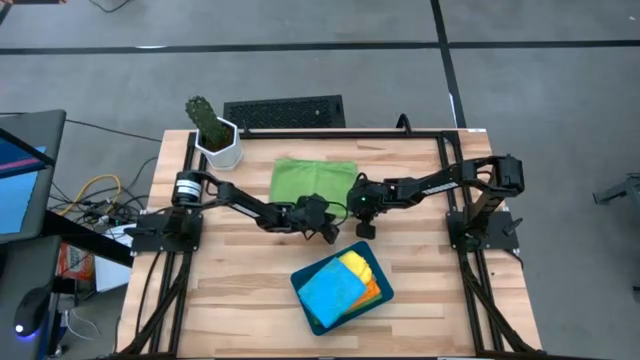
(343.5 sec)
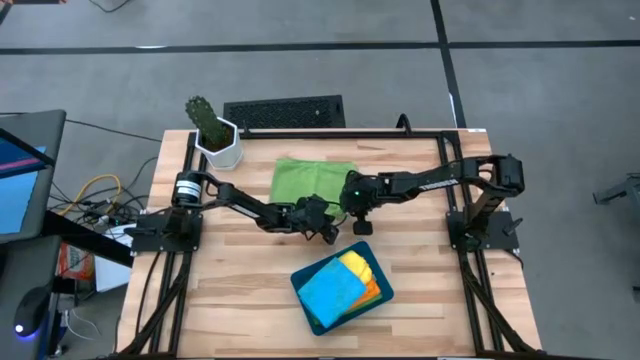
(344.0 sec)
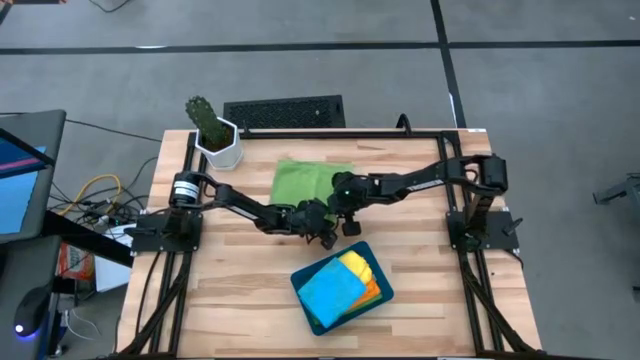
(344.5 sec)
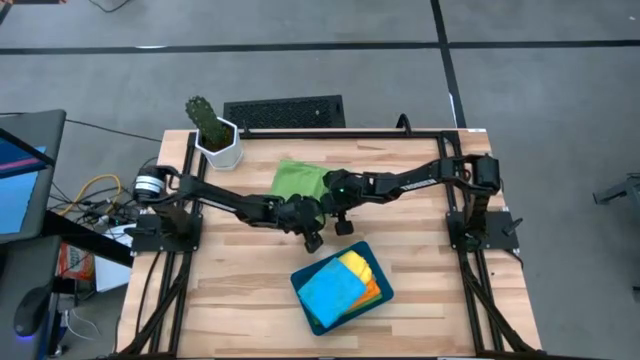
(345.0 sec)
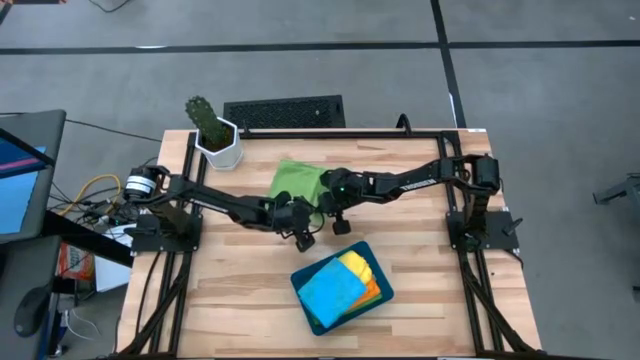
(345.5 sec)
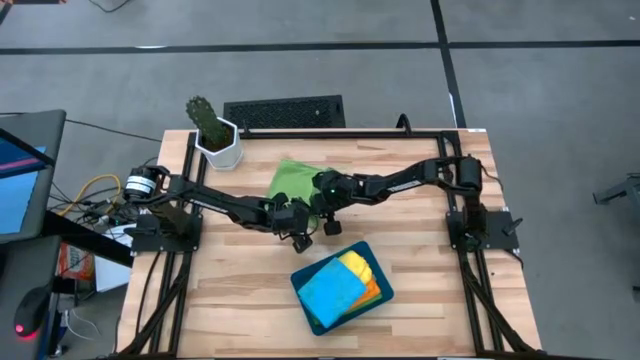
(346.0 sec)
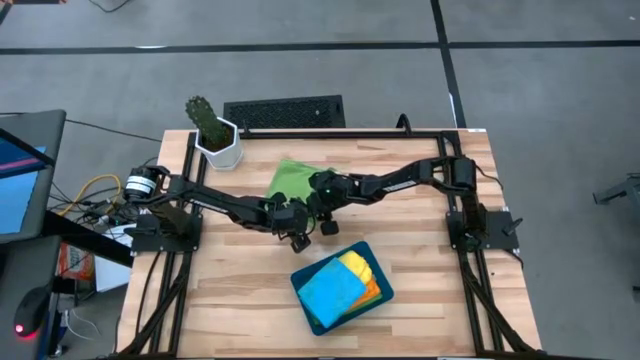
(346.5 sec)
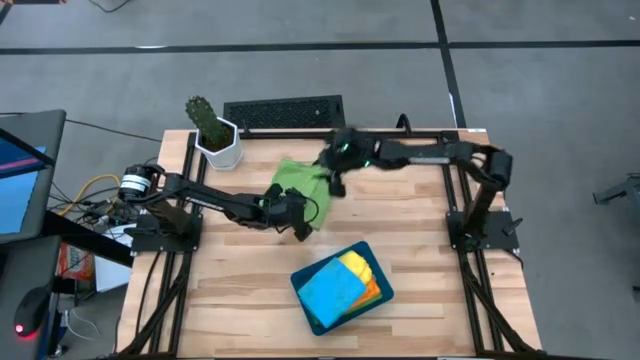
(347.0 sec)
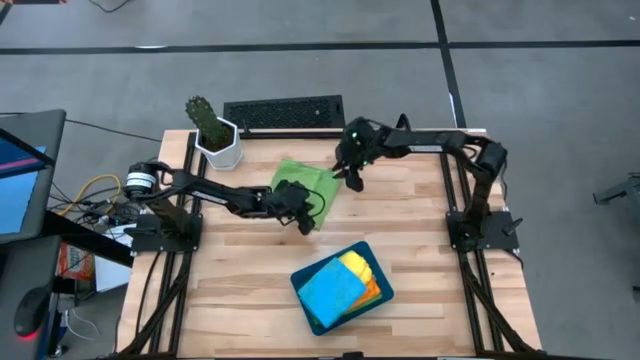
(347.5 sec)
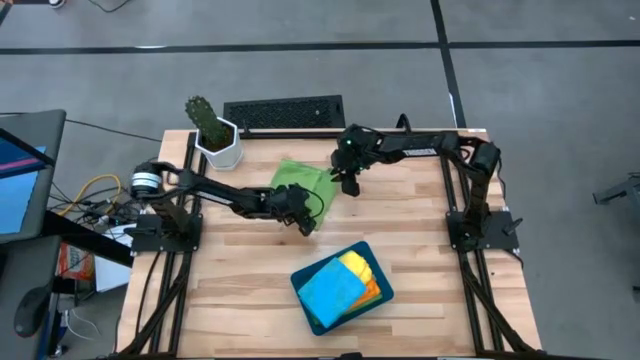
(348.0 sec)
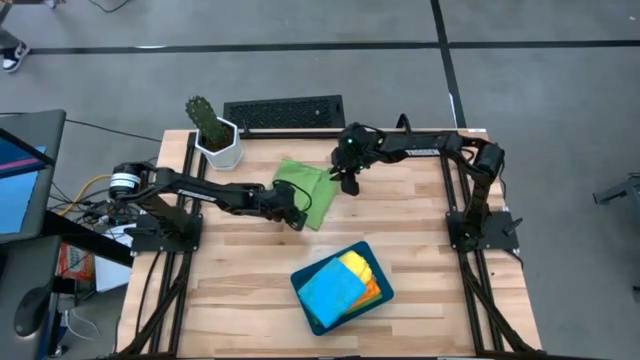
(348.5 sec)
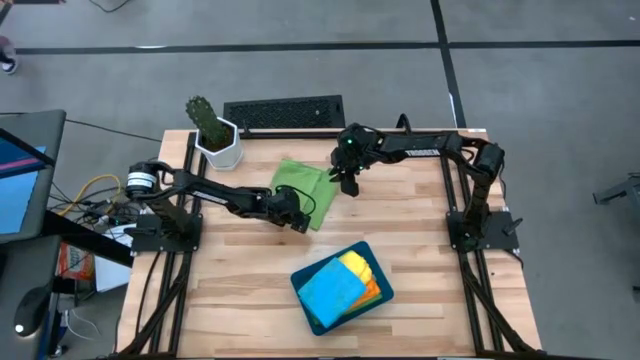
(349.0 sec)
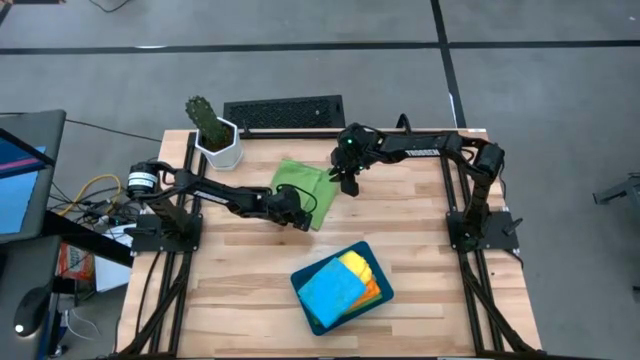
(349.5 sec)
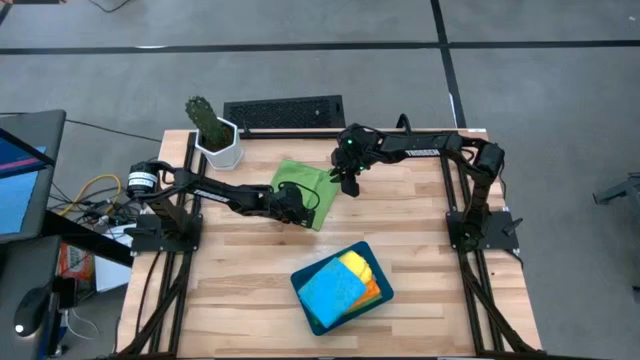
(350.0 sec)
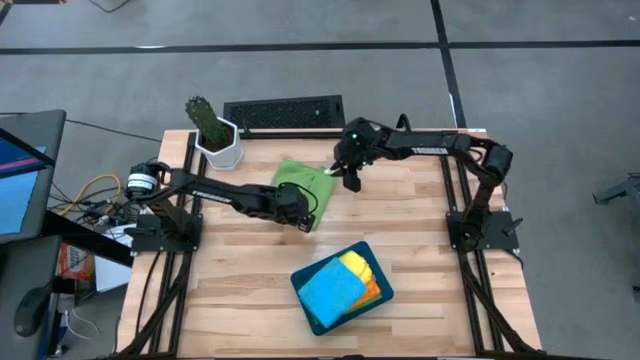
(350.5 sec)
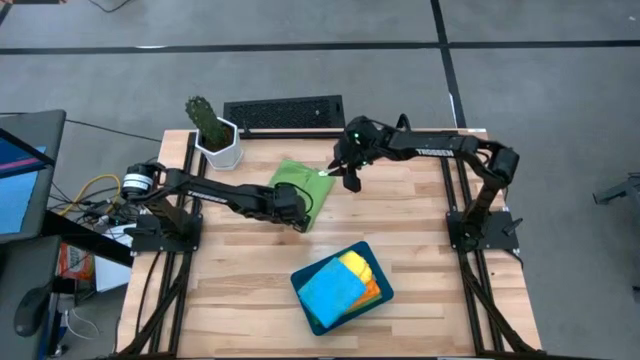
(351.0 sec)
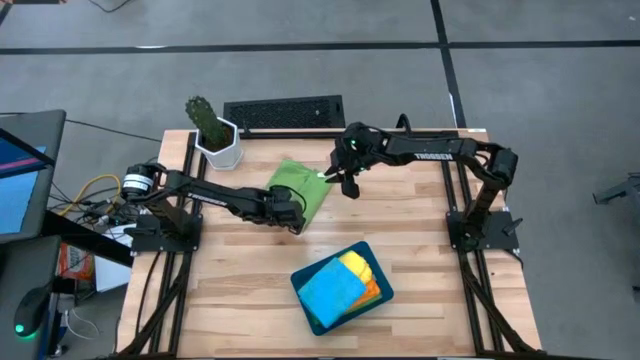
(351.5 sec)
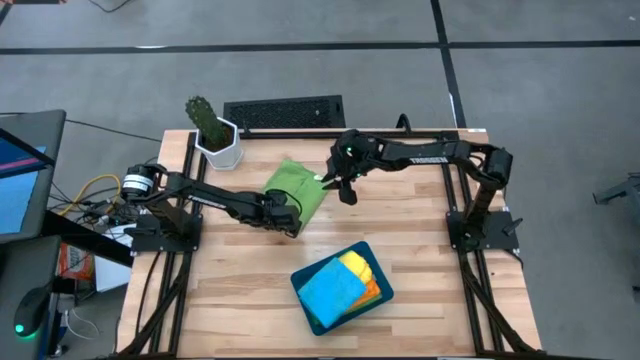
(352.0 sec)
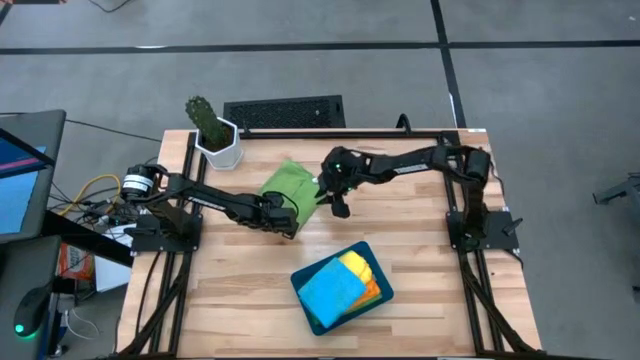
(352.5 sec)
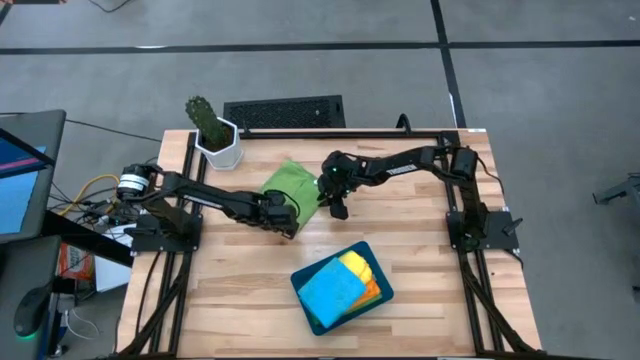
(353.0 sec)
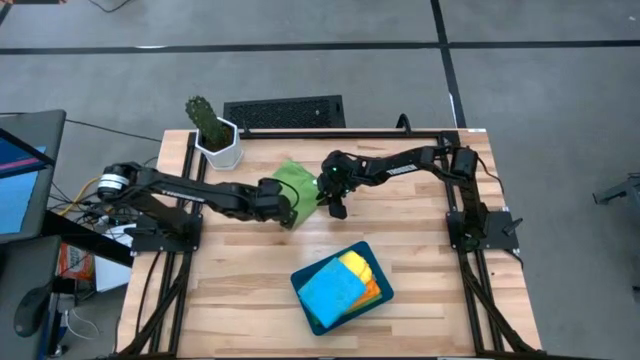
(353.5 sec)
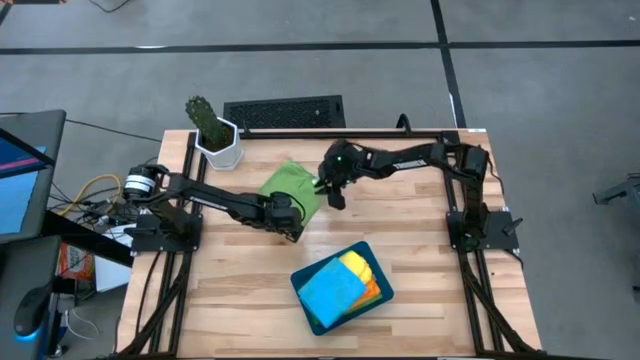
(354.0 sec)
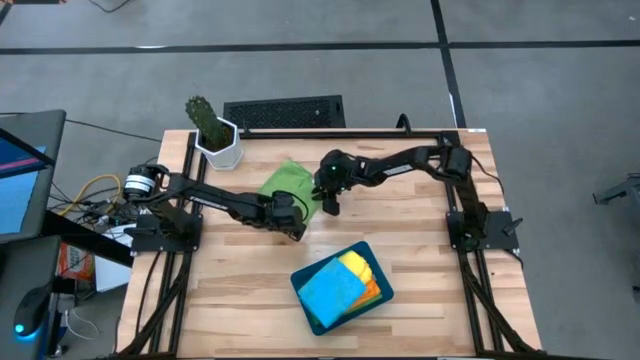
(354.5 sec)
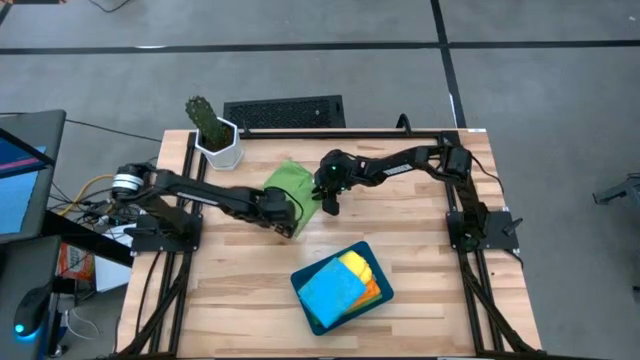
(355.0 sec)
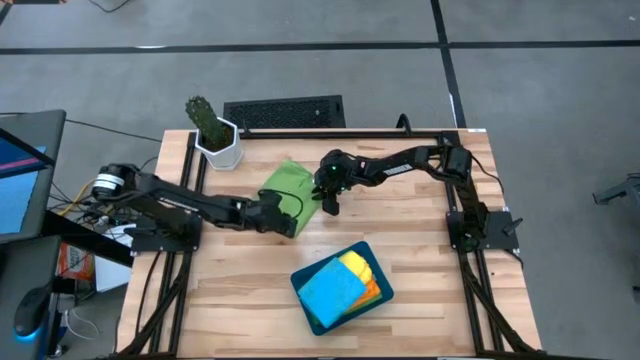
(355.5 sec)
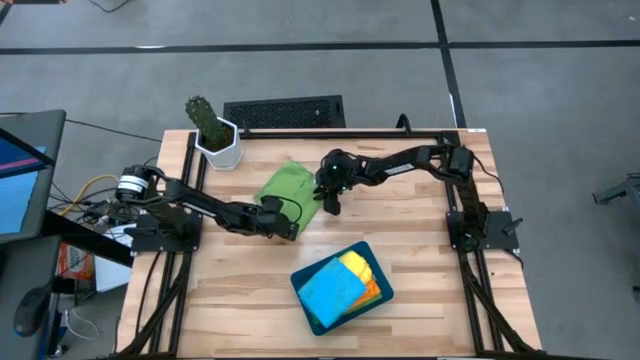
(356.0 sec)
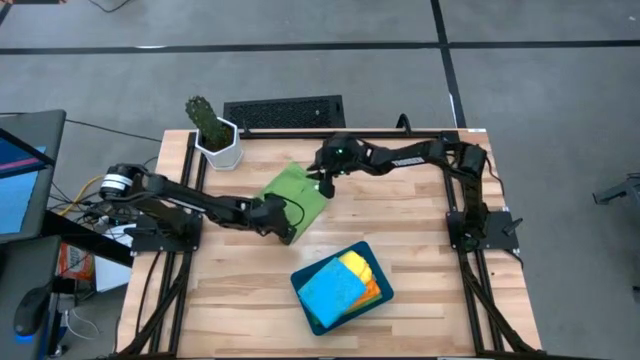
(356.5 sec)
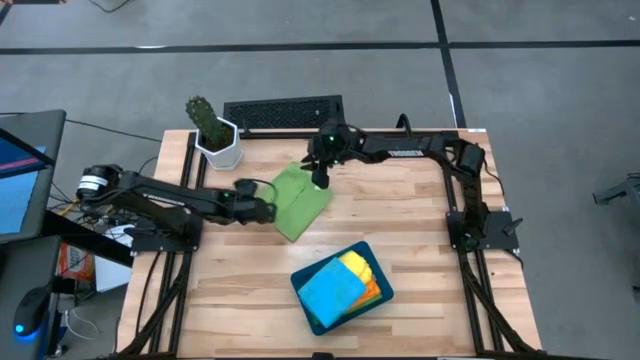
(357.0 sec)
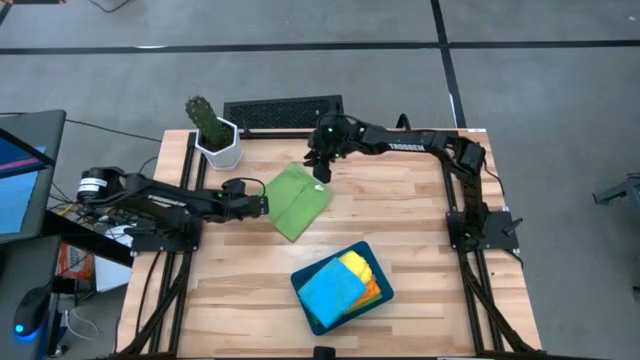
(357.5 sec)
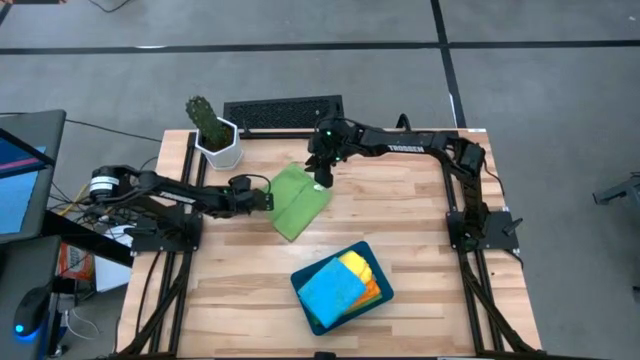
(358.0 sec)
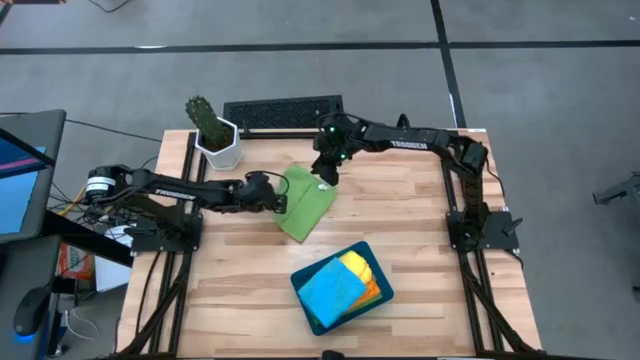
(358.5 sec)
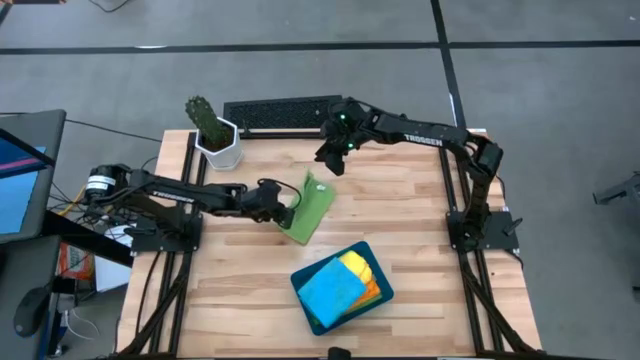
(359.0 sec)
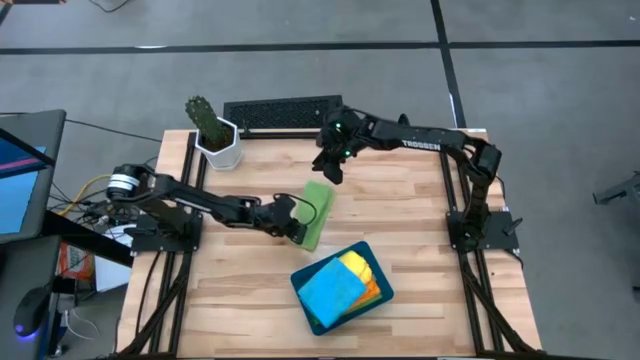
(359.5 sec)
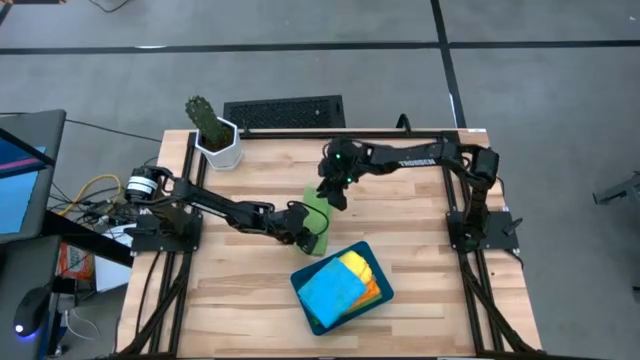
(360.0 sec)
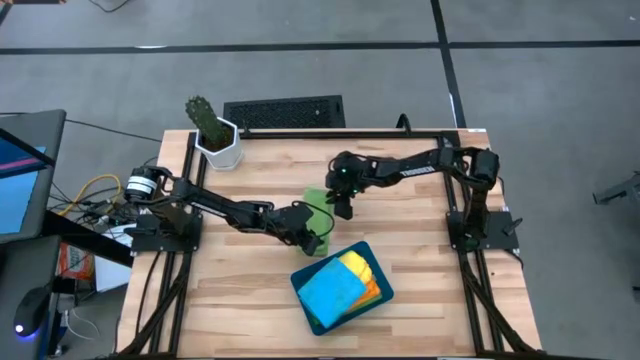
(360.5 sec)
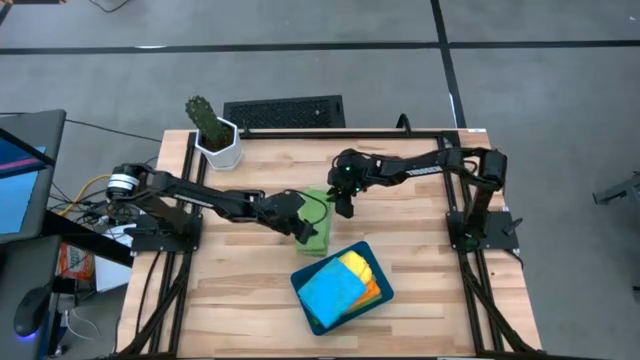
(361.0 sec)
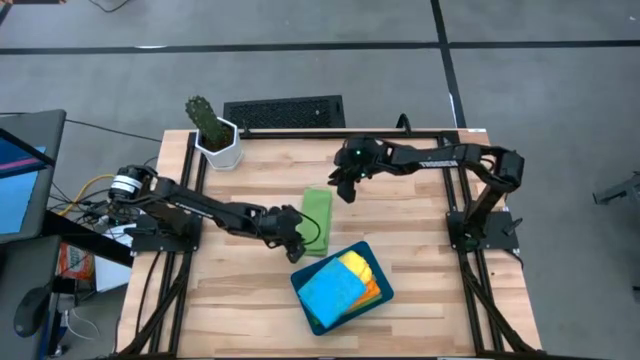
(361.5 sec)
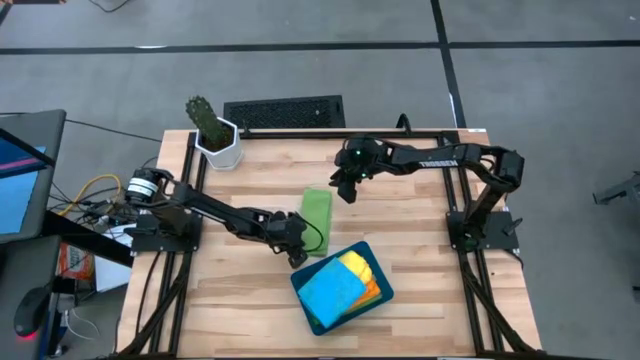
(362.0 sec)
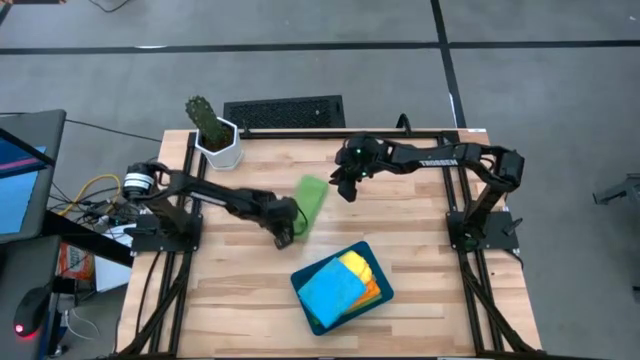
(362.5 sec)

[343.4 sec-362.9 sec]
Task: Fold microfiber towels
Fold the green microfiber towel

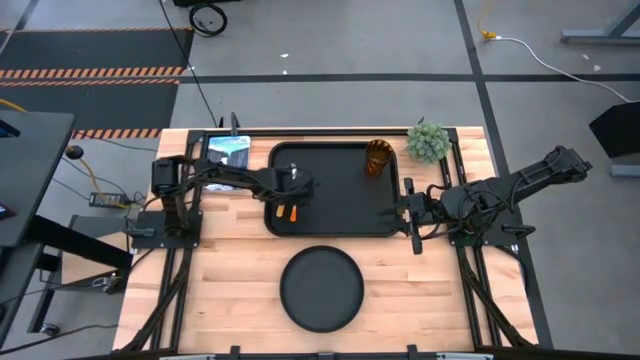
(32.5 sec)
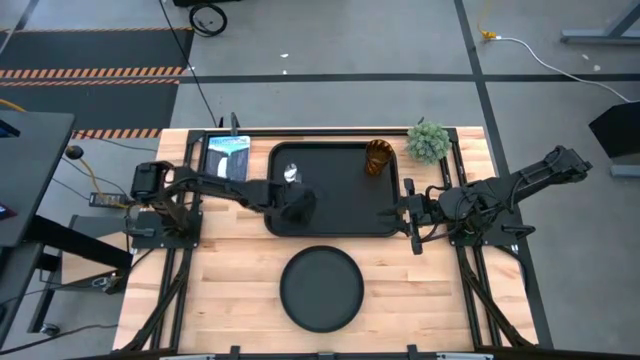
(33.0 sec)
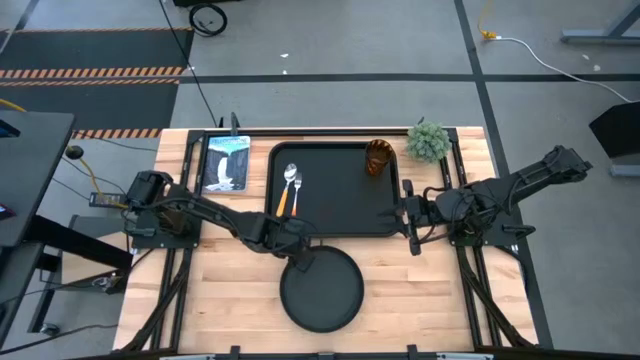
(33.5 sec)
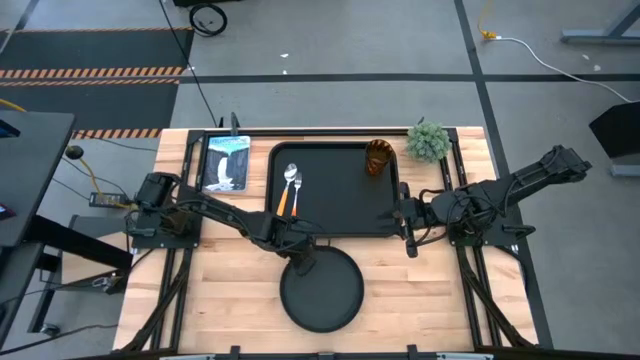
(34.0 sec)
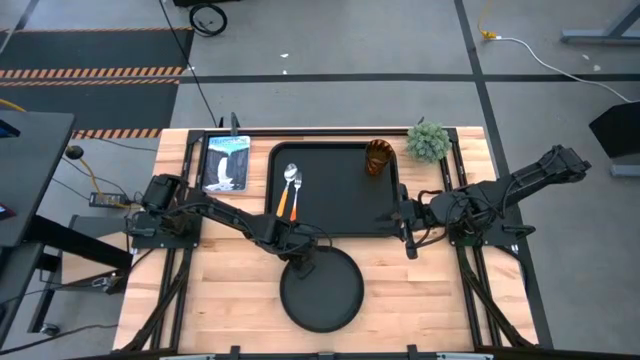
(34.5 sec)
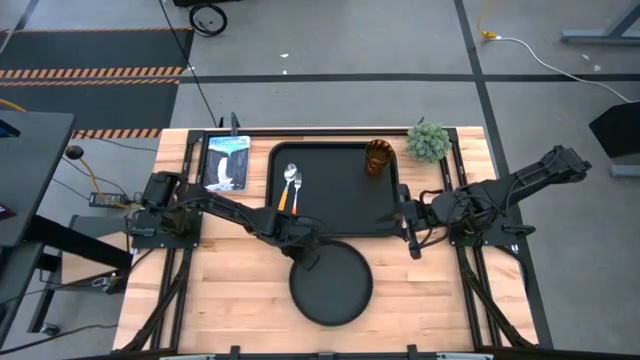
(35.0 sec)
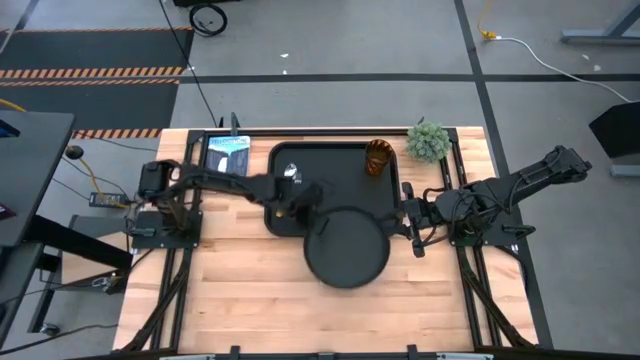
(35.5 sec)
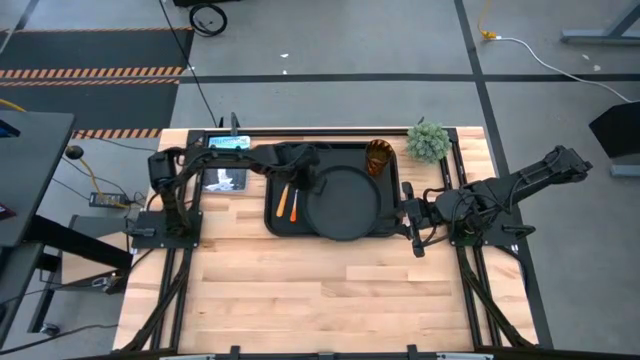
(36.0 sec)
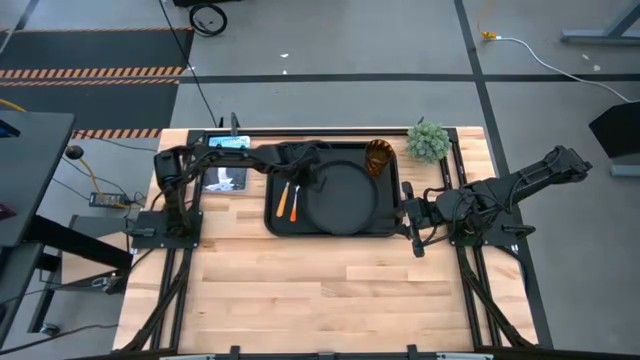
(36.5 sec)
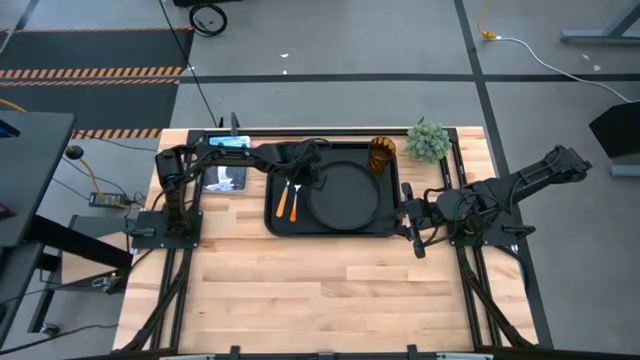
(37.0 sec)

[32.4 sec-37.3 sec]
Task: Pick and place plate/cup/fork/spoon on tray
Put the black plate on the black tray below the orange cup
